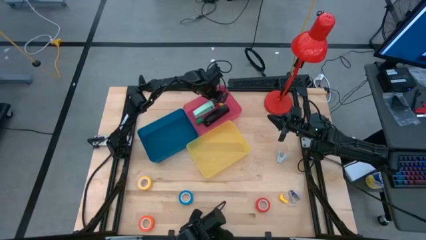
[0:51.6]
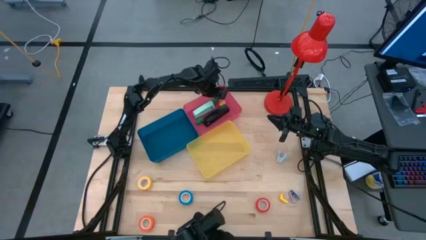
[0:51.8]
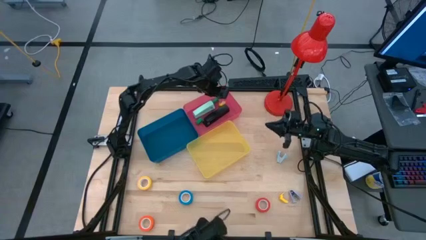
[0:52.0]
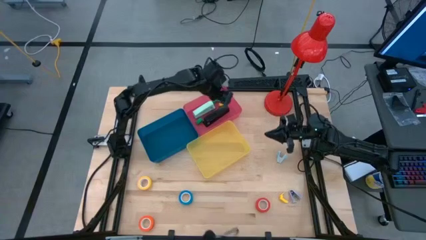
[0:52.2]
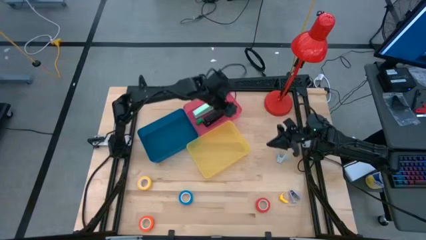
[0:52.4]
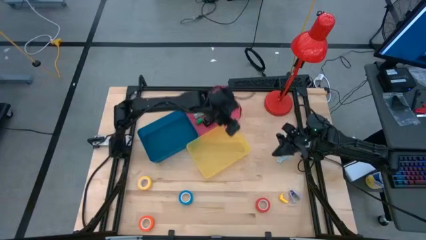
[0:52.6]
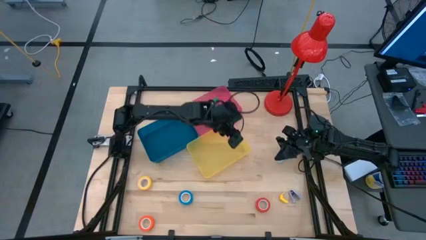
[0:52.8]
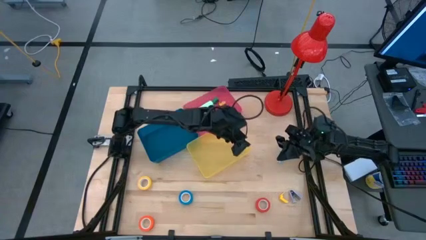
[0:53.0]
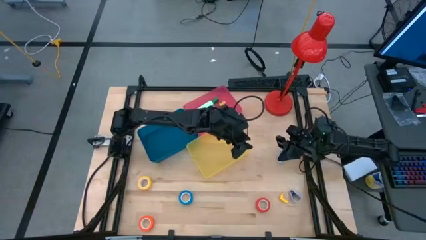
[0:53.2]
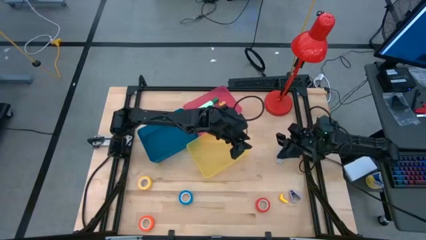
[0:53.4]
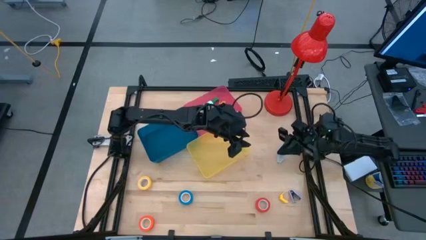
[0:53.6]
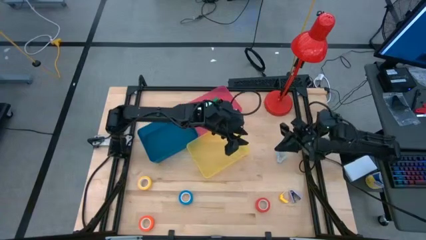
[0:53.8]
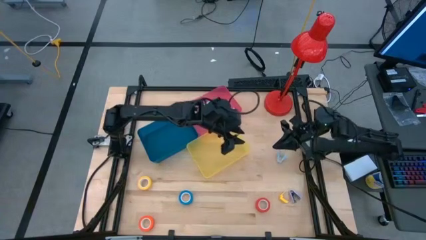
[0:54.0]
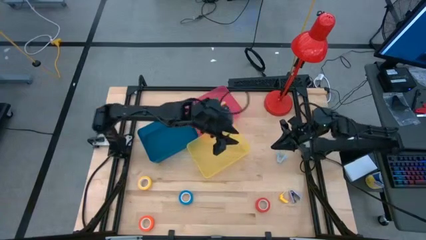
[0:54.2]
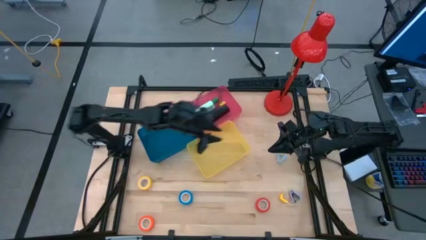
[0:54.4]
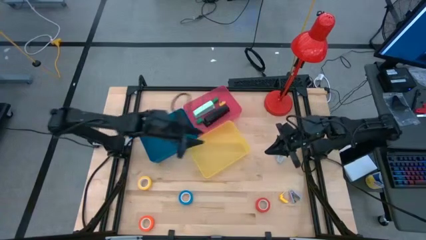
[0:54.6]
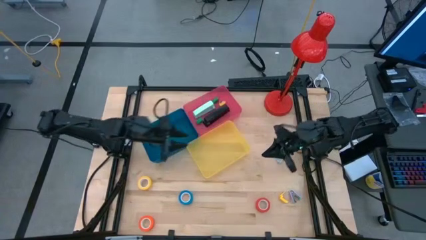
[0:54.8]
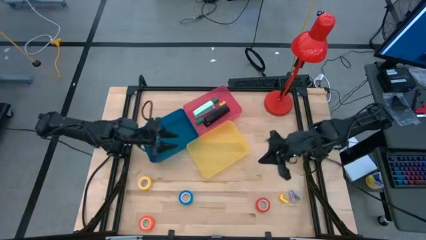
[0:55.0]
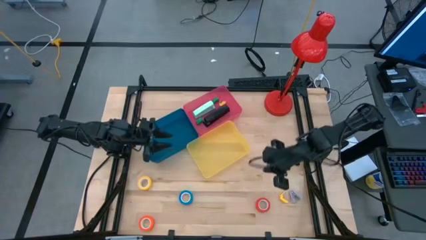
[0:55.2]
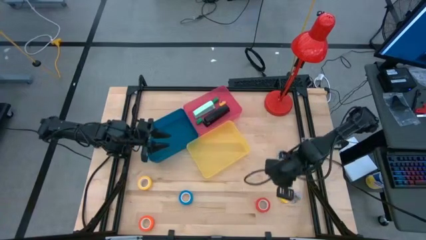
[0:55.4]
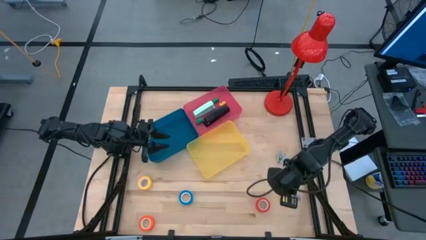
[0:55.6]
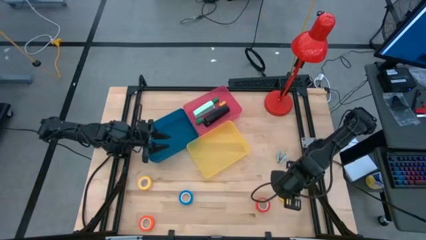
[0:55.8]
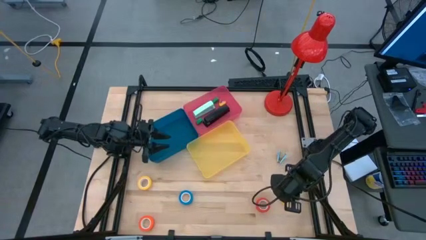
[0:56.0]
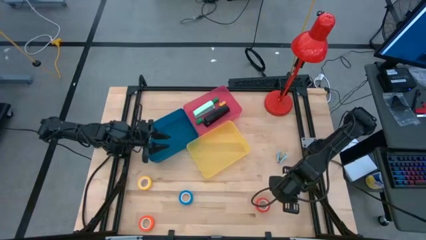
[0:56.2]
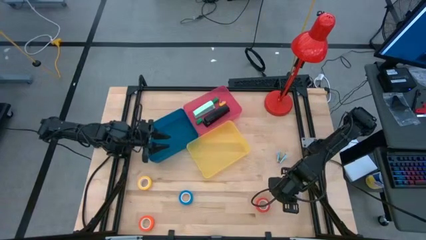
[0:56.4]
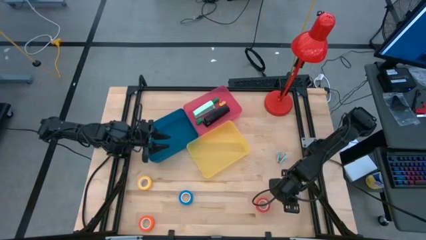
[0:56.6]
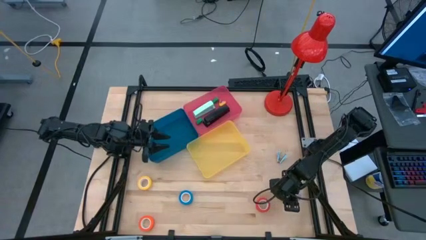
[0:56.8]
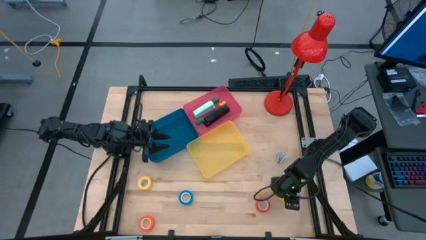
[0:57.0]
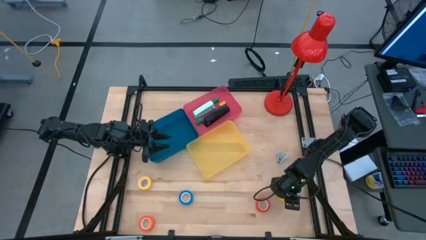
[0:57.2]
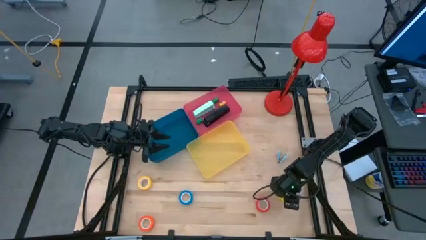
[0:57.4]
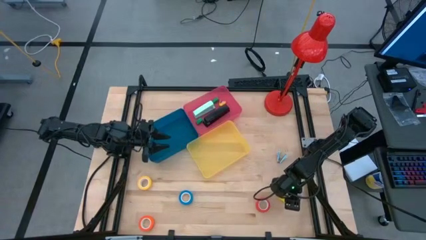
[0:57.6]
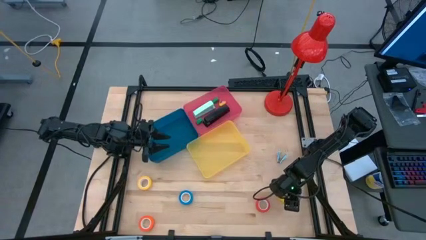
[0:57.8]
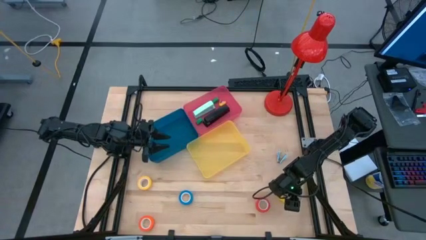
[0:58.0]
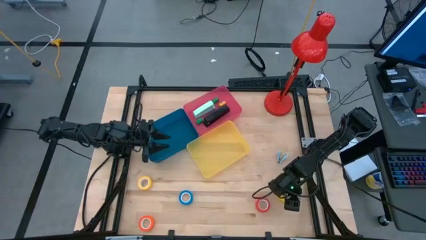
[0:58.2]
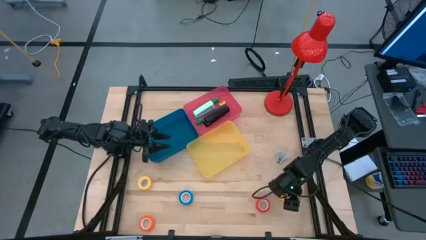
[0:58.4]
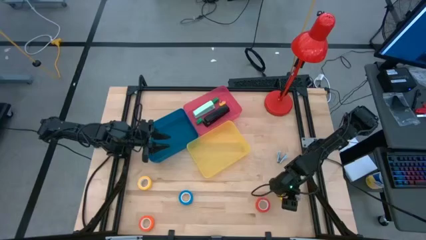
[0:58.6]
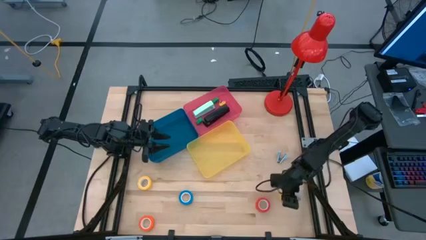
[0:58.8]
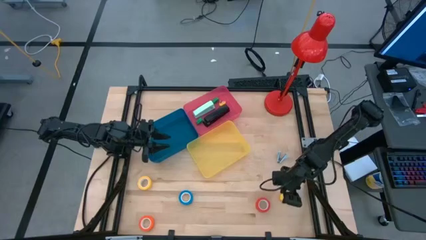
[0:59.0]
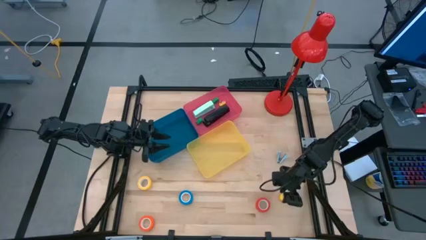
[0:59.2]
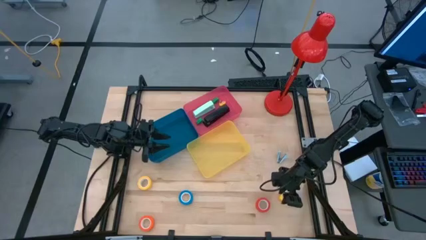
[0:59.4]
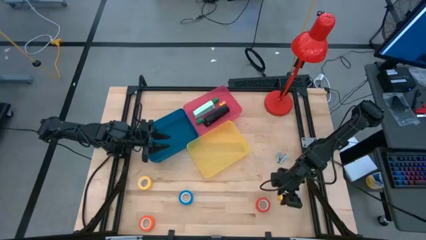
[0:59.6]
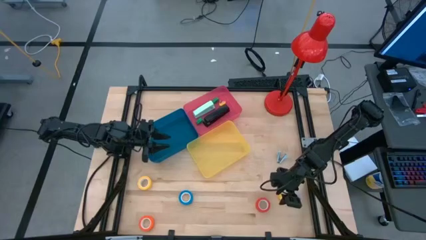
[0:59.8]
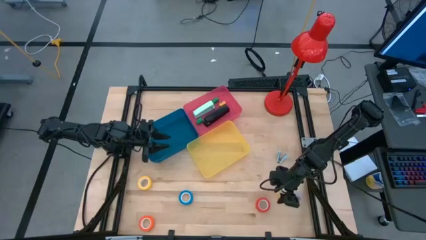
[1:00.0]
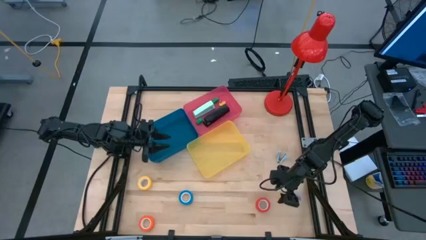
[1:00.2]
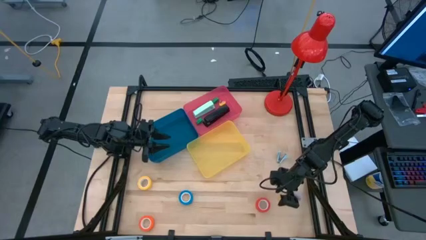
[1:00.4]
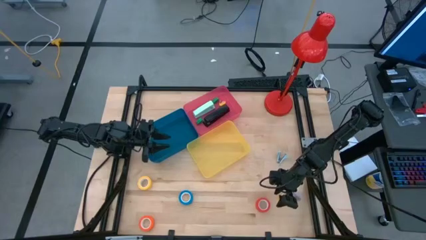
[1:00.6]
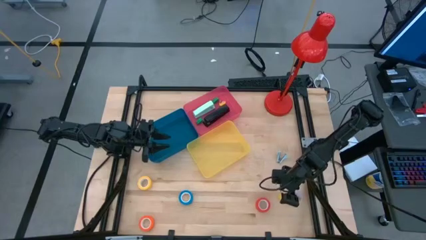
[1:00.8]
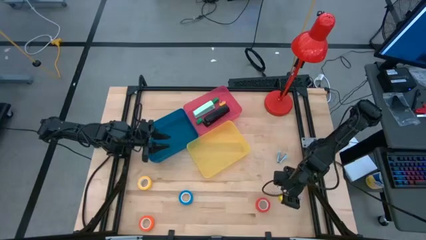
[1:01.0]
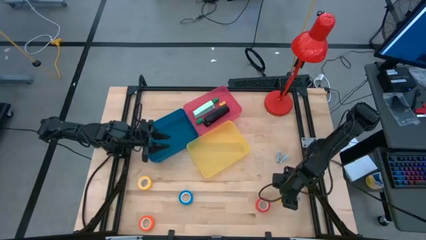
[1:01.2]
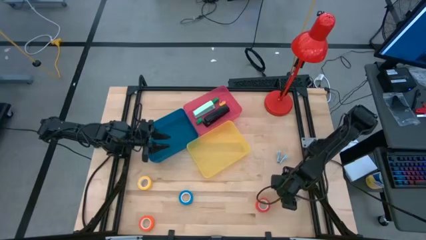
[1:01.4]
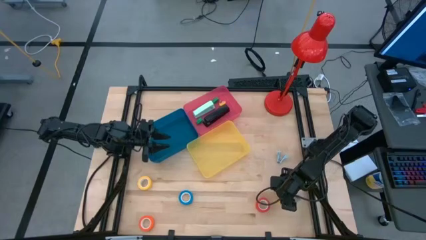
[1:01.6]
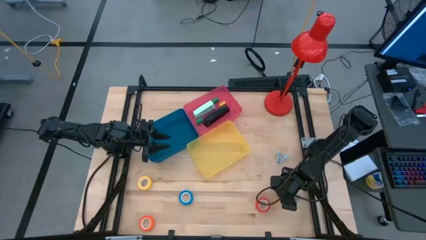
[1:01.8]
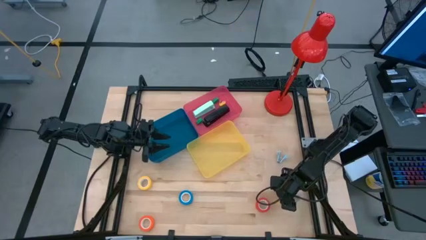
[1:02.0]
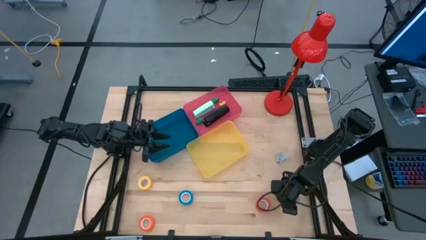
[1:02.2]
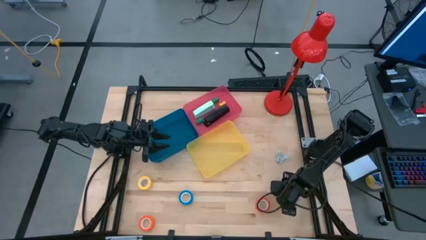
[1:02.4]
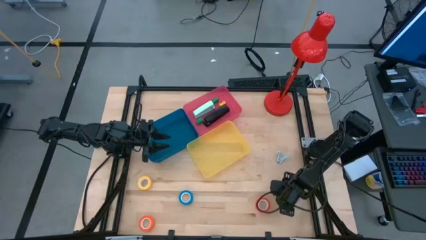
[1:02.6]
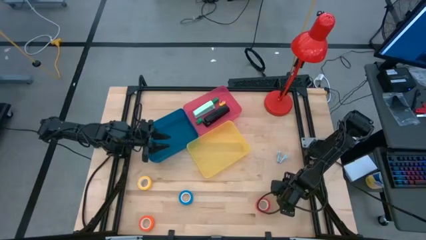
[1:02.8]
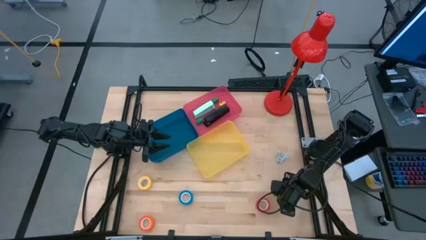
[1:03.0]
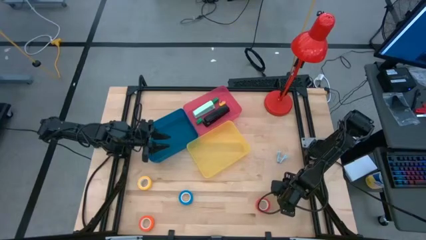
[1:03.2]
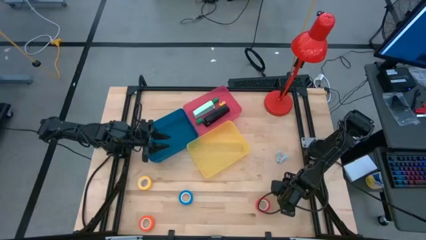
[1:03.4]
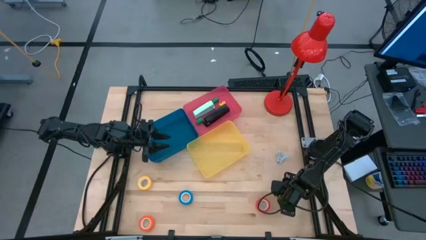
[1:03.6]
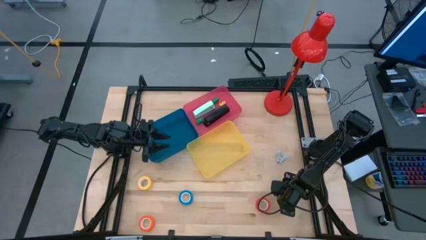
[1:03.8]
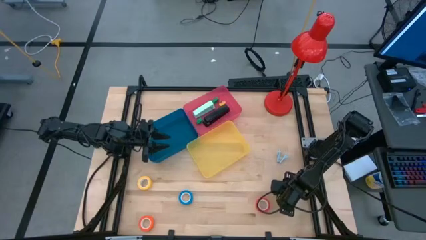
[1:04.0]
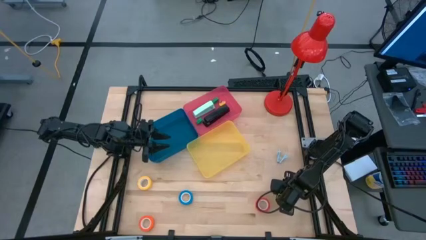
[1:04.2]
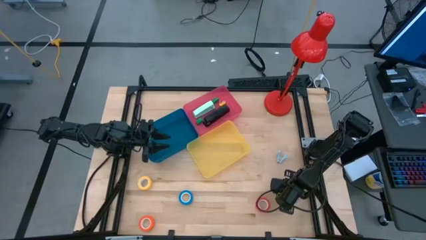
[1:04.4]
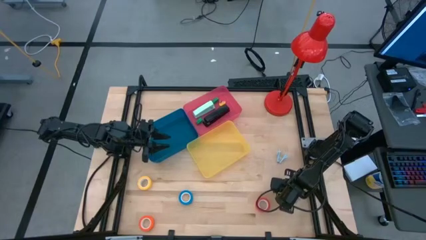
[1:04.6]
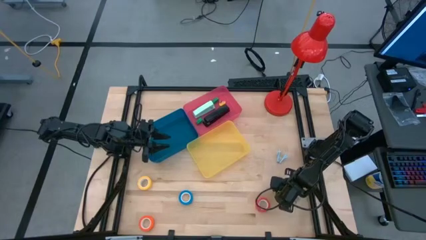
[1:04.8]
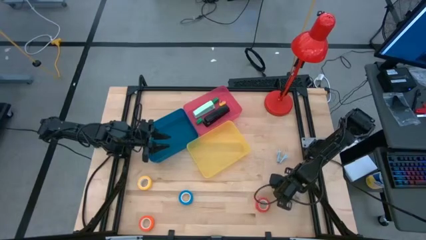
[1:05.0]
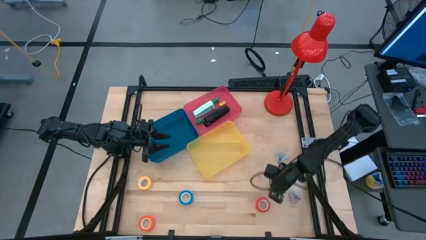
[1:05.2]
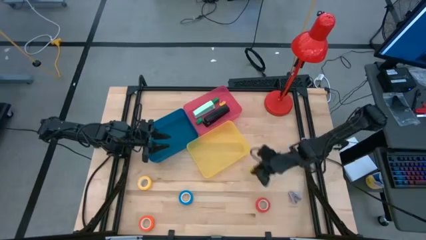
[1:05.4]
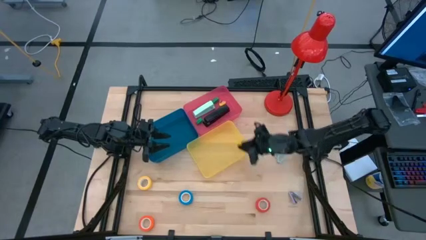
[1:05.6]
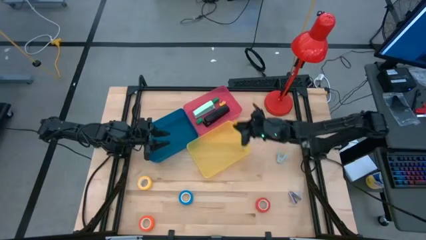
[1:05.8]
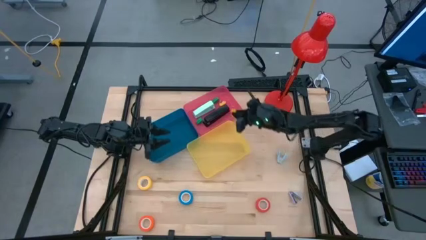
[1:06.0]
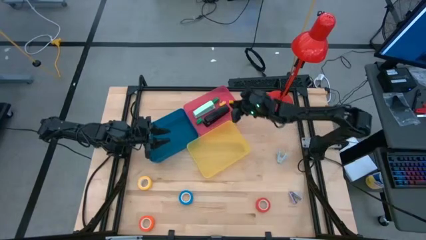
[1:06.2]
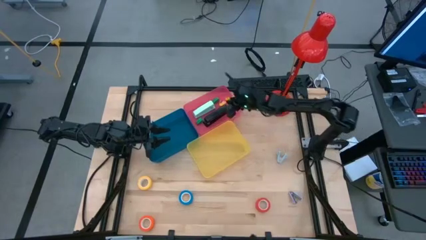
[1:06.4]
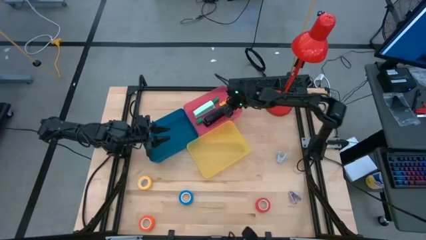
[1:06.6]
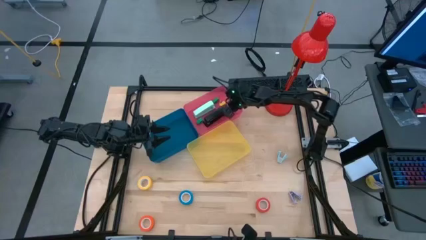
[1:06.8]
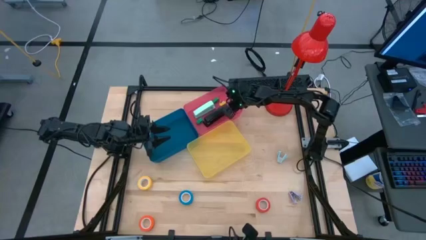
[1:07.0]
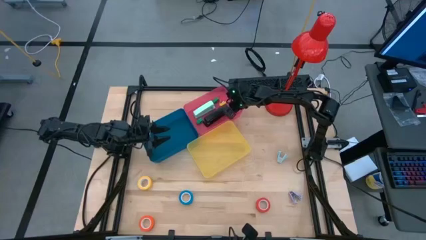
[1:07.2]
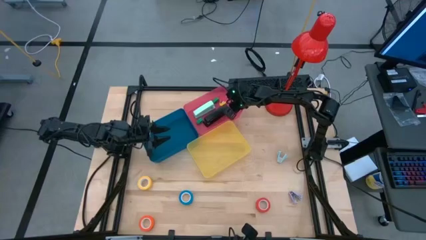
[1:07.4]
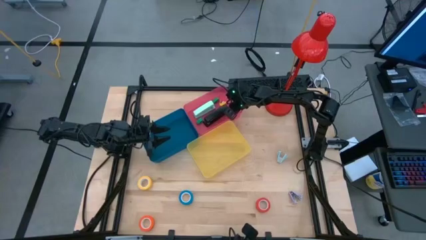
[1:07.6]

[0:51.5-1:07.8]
Task: Pick and place Stapler, Stapler remover, tape
Put the yellow stapler into the red bin
